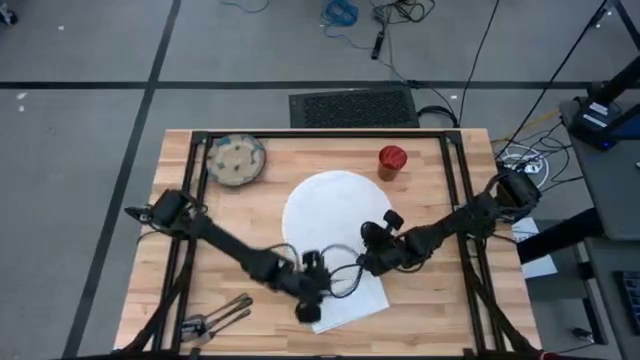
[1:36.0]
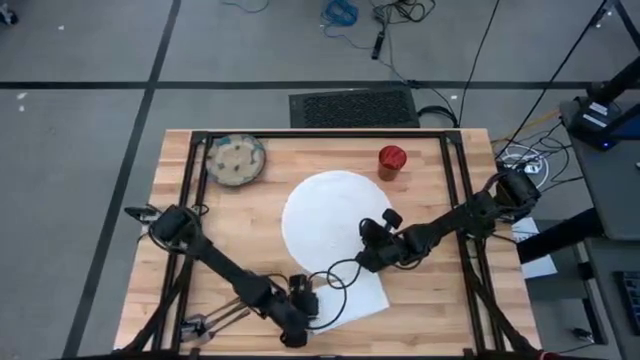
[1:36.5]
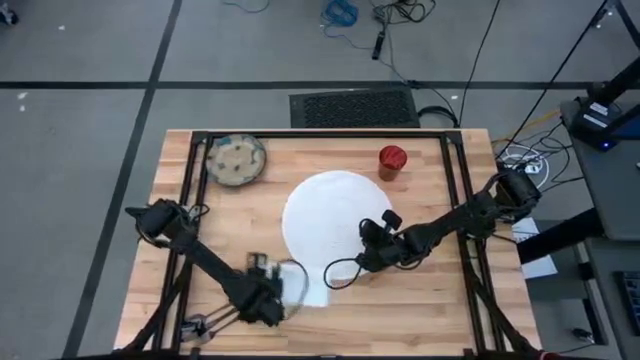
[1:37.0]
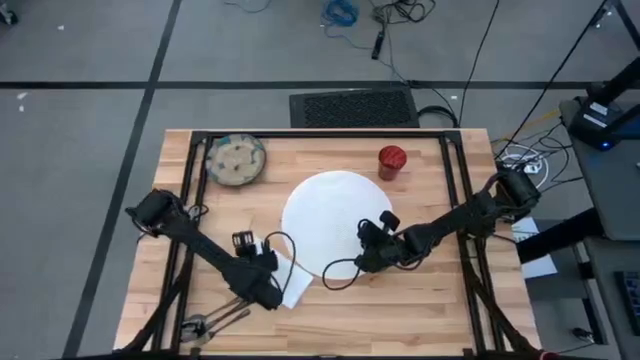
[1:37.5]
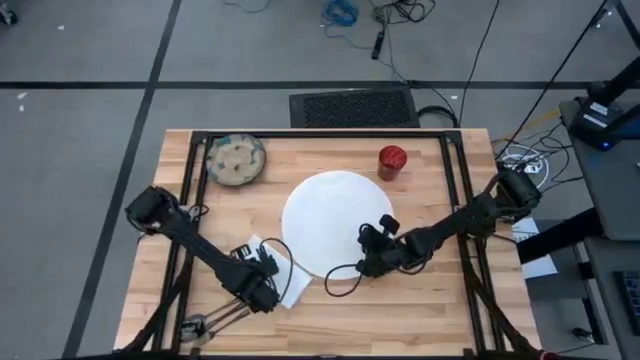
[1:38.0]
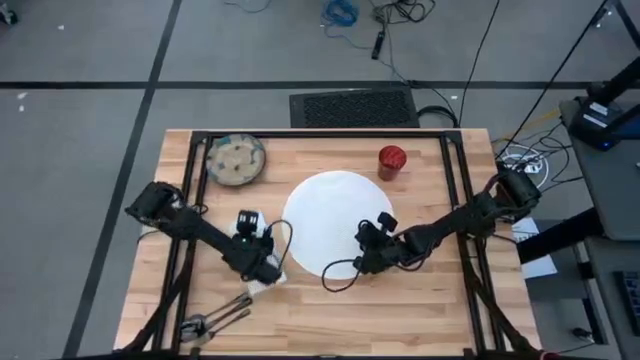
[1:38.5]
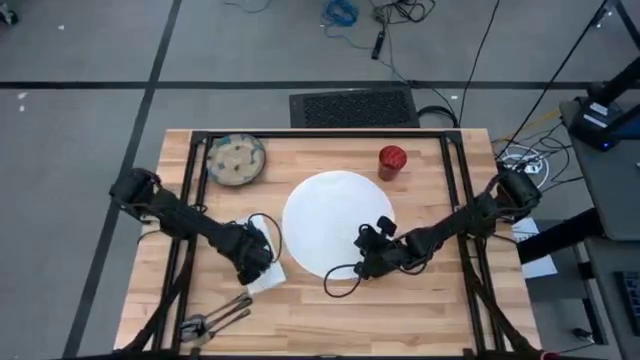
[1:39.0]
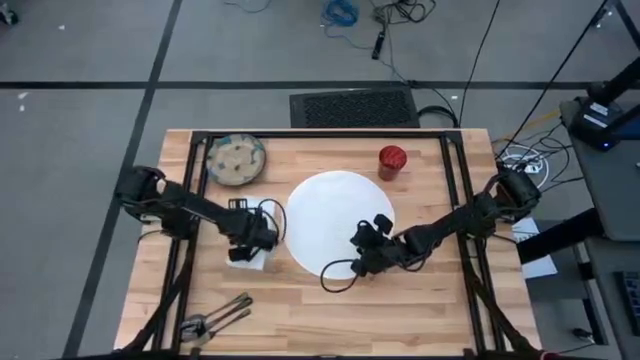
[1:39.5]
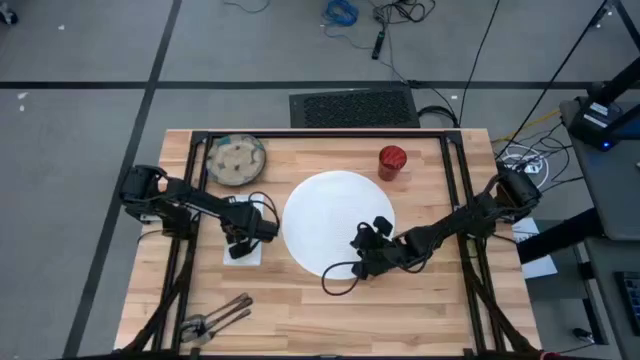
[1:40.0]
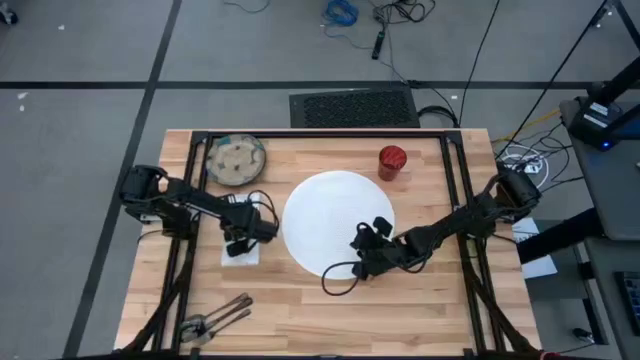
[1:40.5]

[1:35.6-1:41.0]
Task: Set table place
Move the white napkin to the middle left of the table

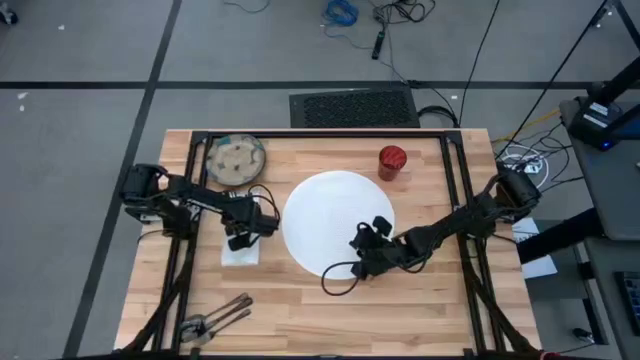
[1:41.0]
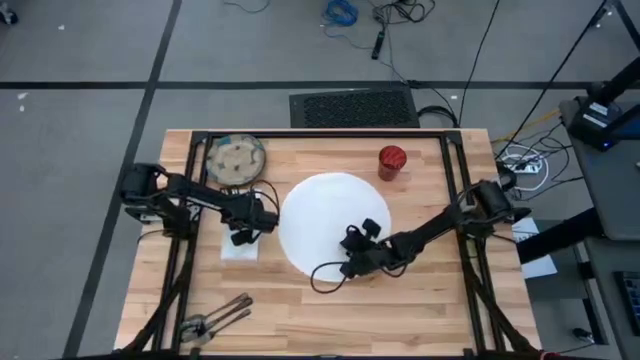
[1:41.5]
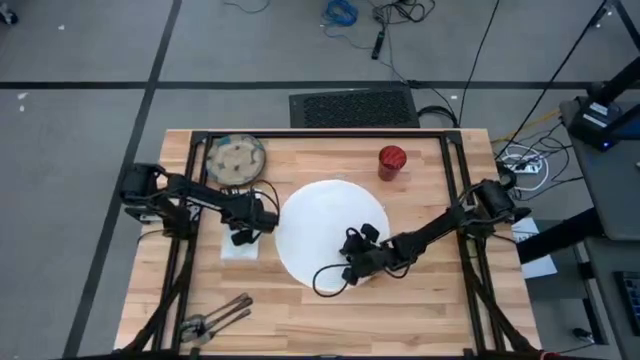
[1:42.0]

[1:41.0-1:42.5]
Adjust the white mat

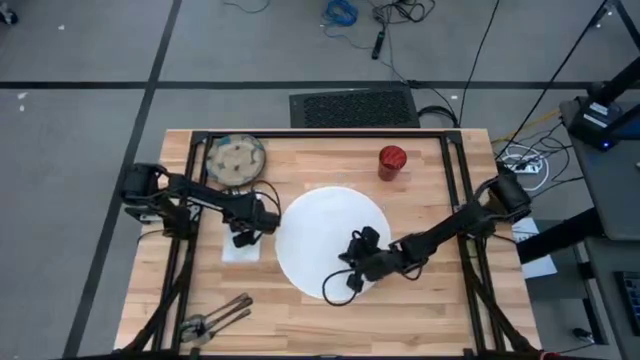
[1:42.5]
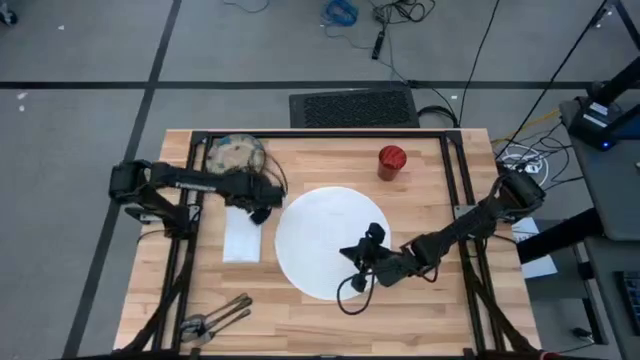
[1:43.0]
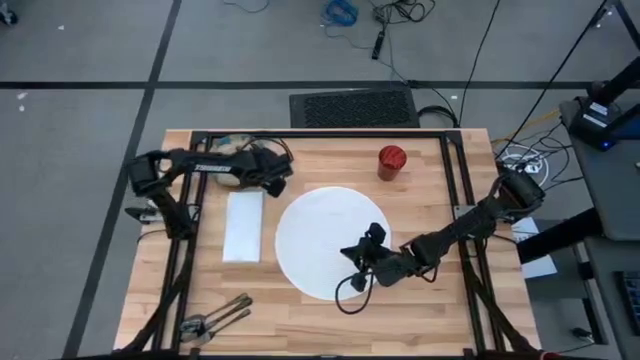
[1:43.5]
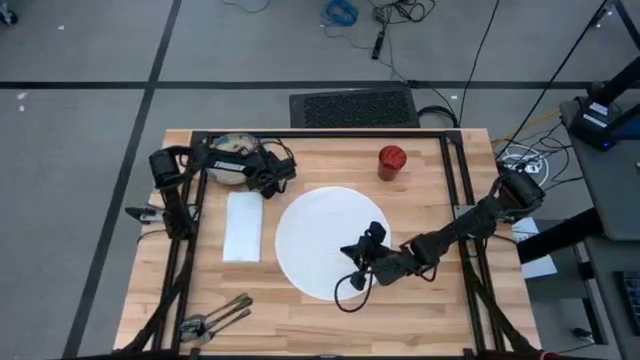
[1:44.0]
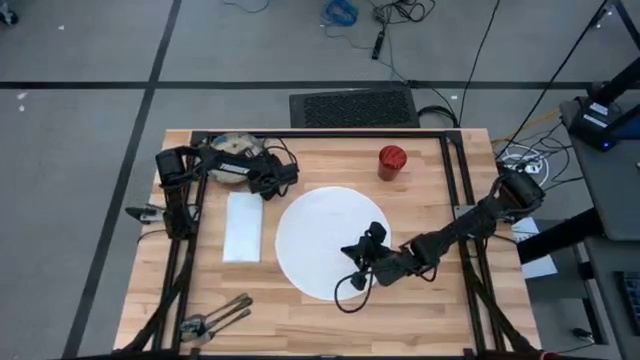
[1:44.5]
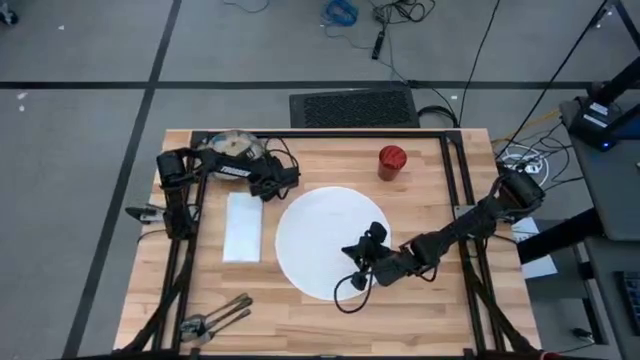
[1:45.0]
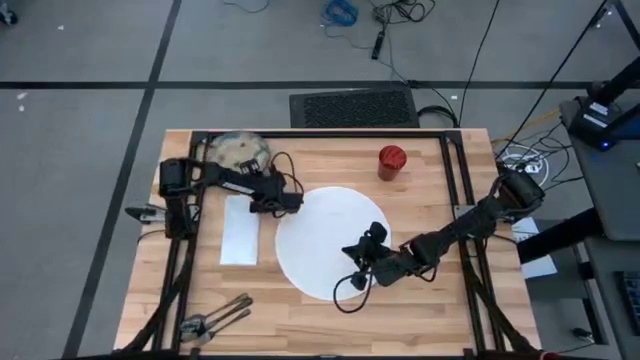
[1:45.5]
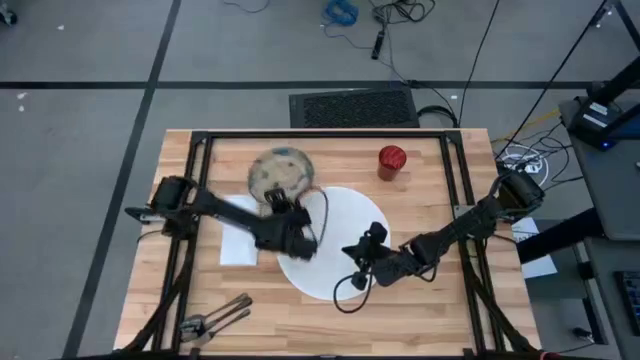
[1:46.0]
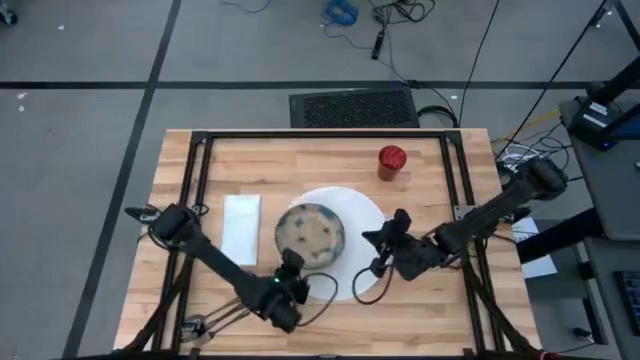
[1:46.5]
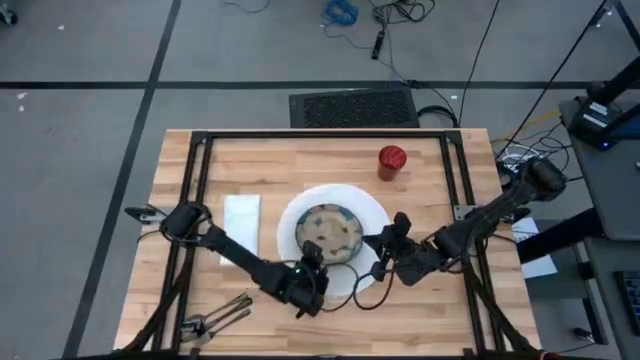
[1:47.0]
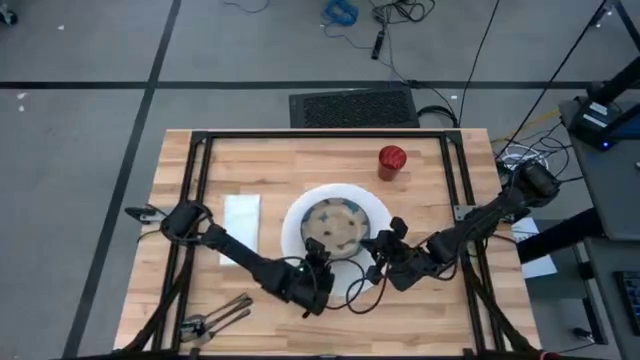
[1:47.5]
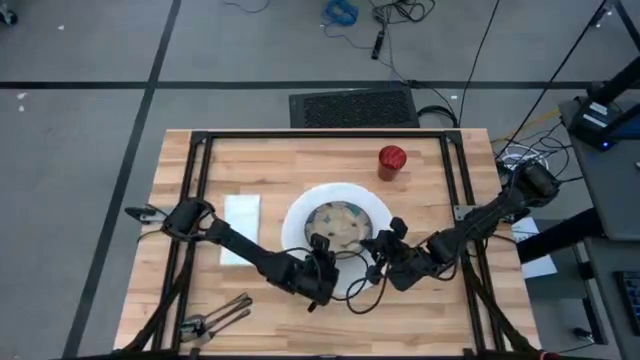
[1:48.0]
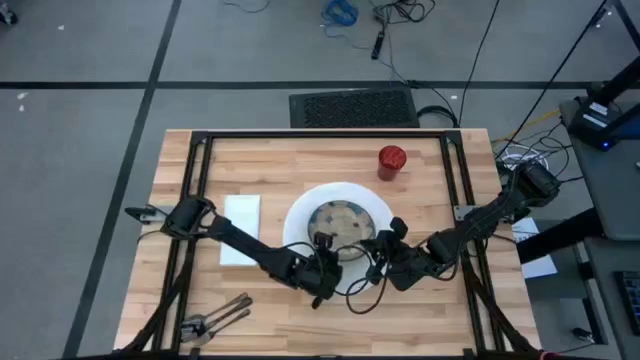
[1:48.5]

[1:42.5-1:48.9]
Put the blue patterned plate on the white mat

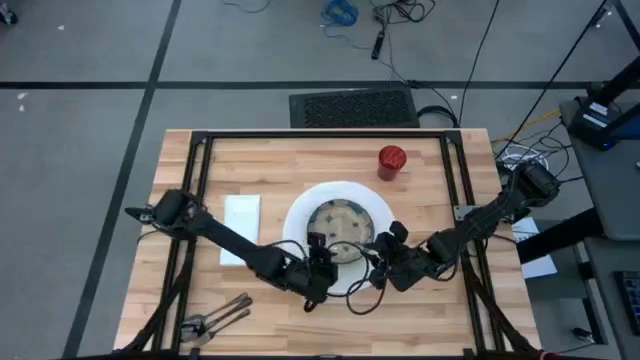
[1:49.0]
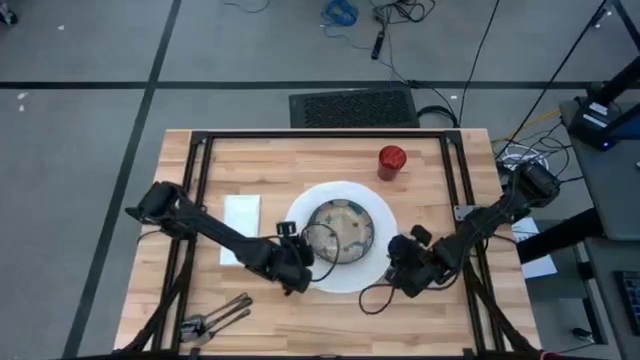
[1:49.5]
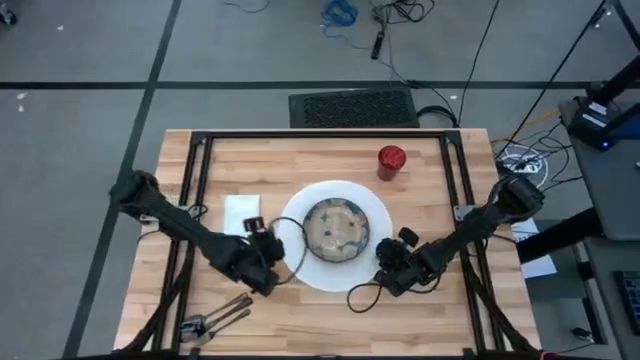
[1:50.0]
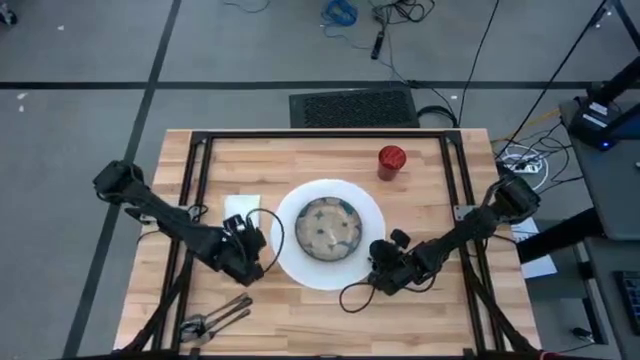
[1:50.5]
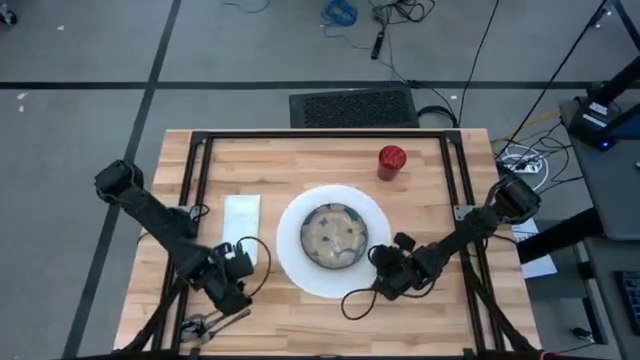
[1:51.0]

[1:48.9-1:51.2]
Adjust the white mat
